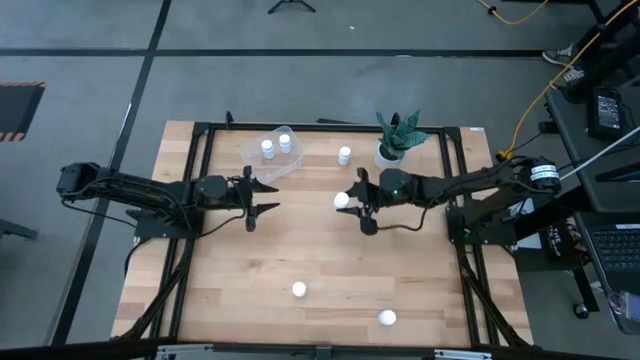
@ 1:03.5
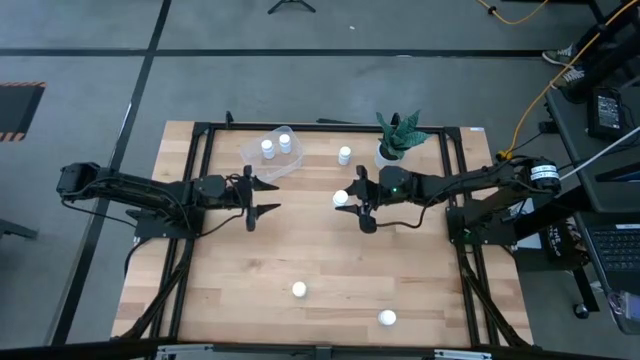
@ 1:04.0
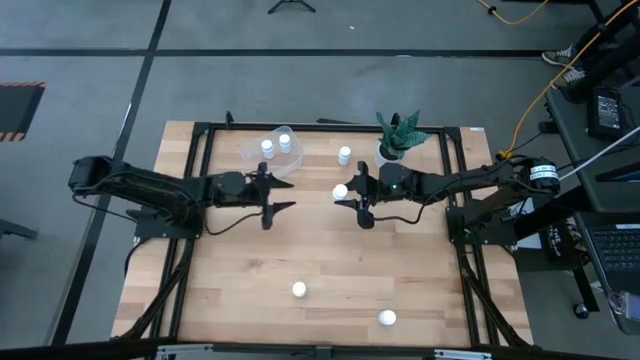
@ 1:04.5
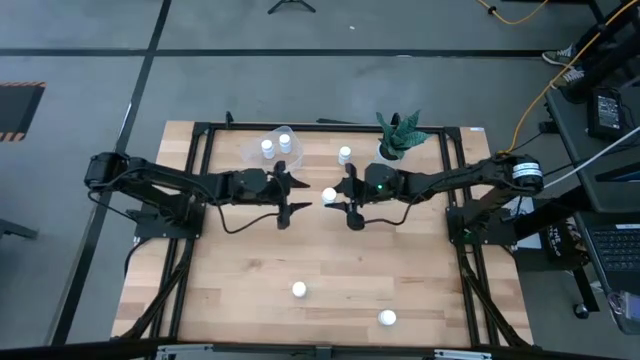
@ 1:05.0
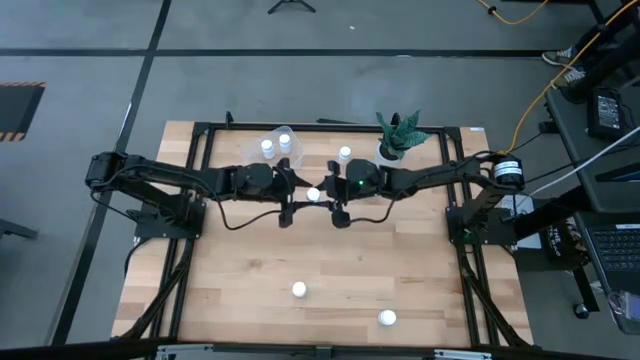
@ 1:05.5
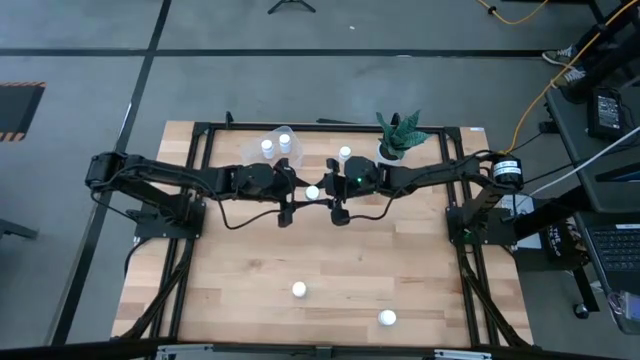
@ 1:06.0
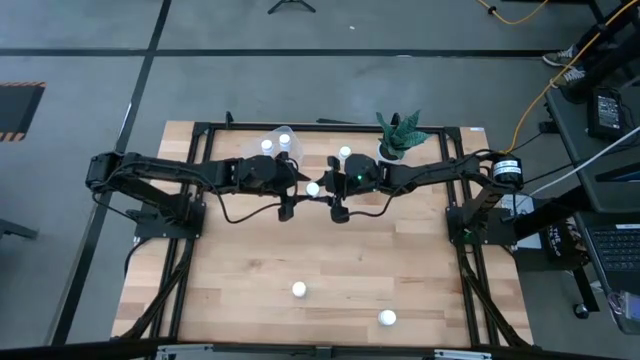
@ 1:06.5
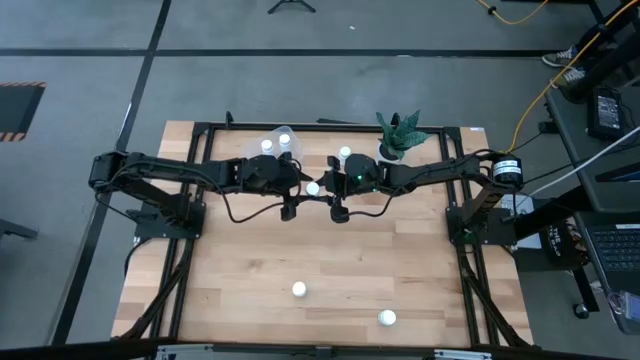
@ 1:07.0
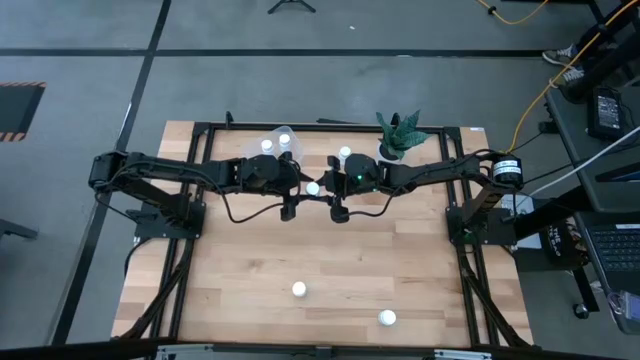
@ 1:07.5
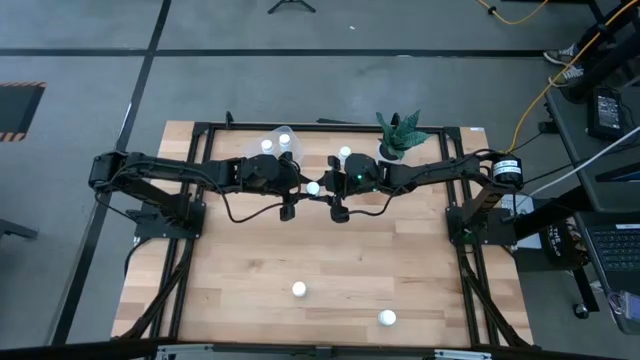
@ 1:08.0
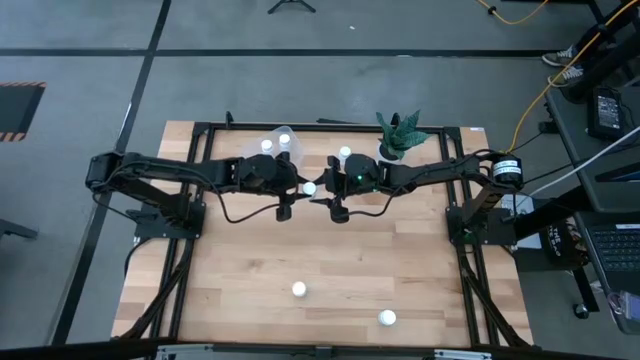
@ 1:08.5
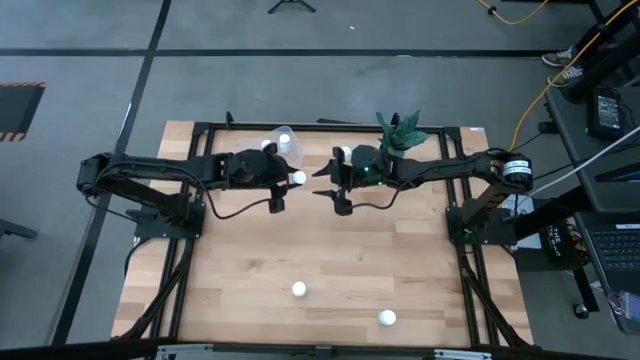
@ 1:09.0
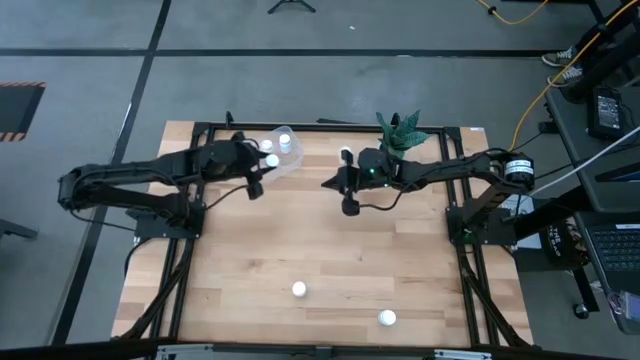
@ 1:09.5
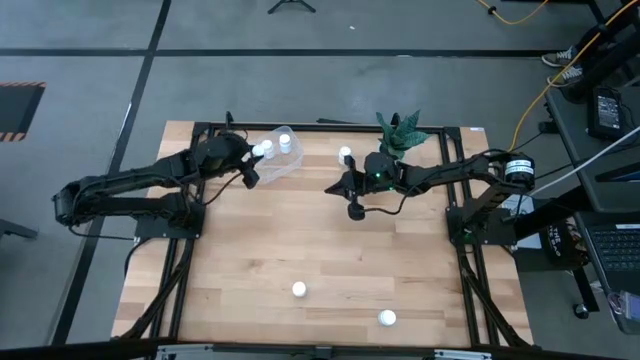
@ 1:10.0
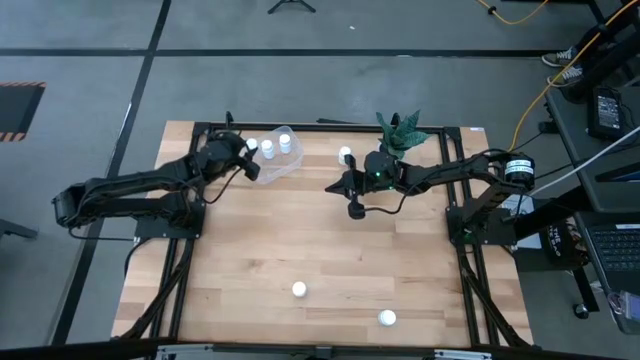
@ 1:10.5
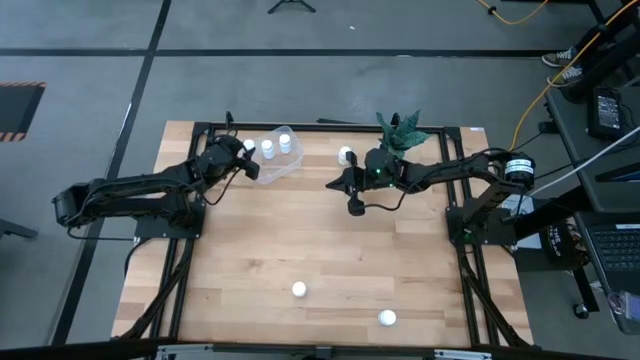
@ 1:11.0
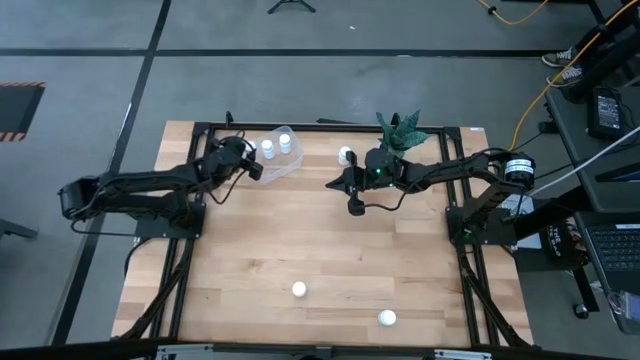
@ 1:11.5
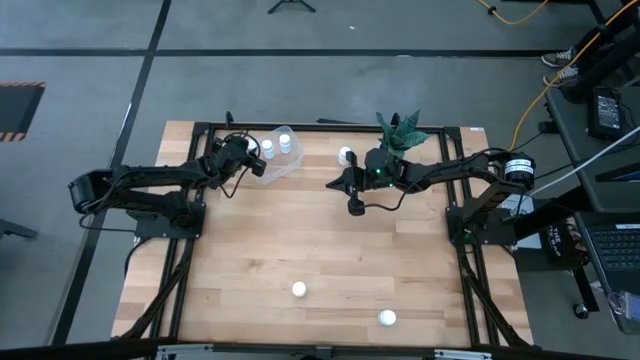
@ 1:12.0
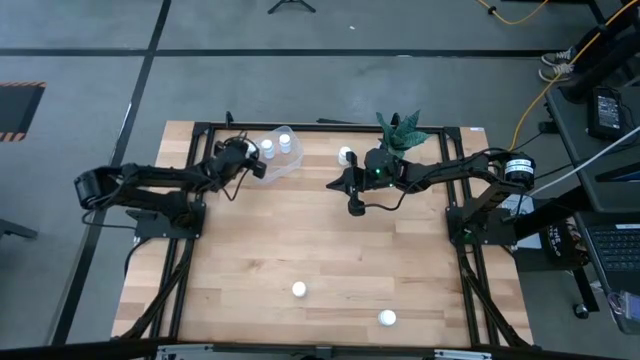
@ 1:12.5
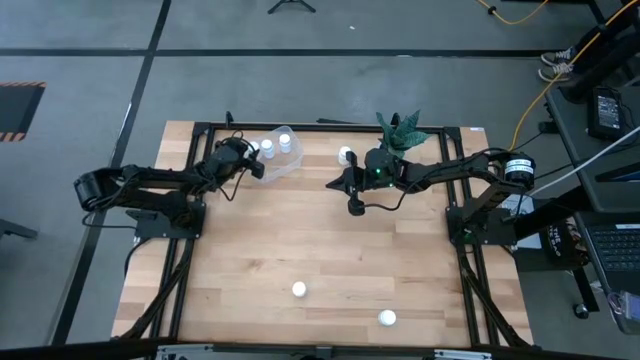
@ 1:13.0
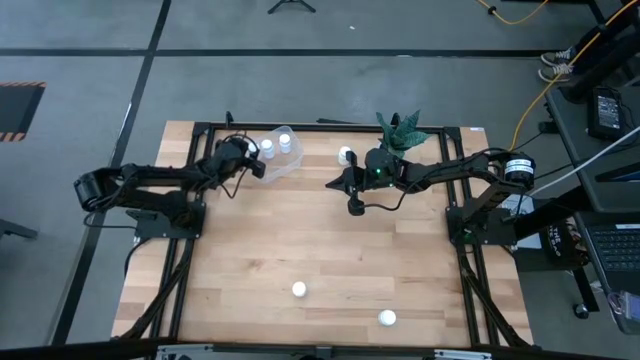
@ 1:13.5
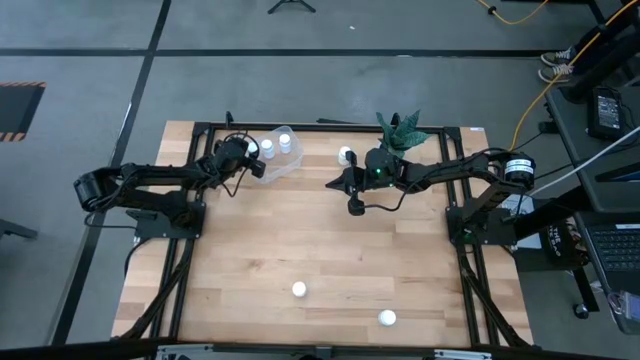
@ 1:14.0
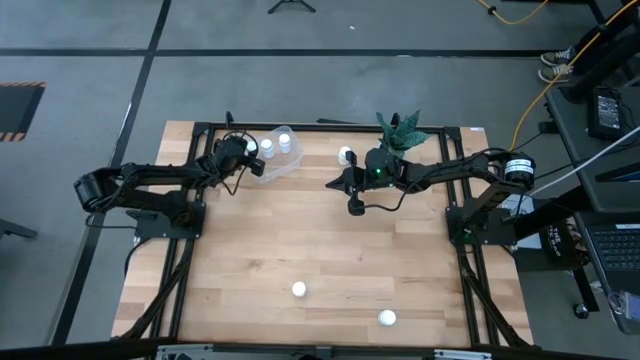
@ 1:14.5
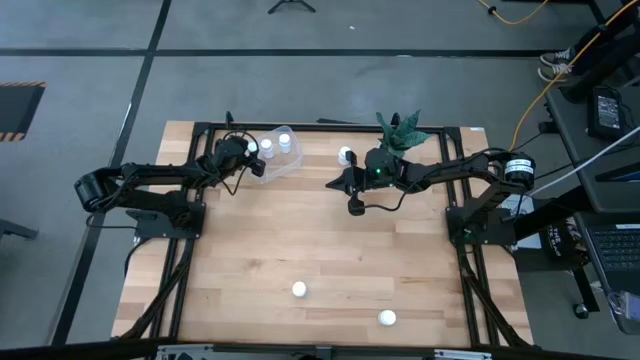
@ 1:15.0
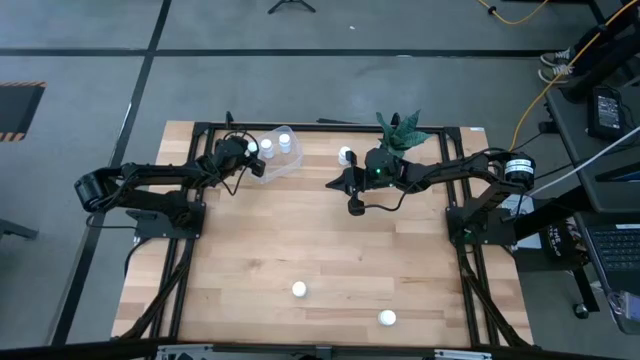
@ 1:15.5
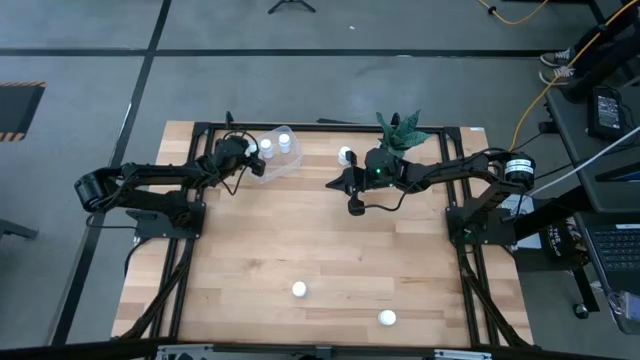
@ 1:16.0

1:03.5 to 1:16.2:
Task: Pick and place pill bottles into a basket
Put the white pill bottle into the transparent container

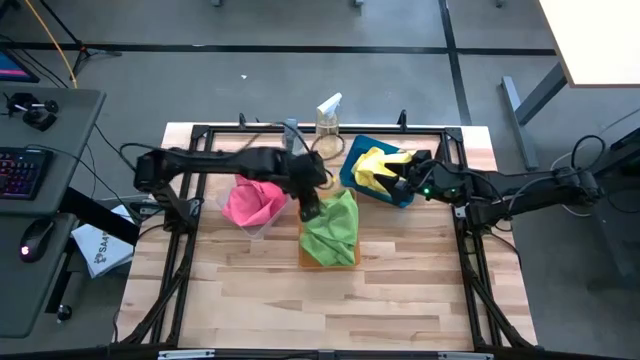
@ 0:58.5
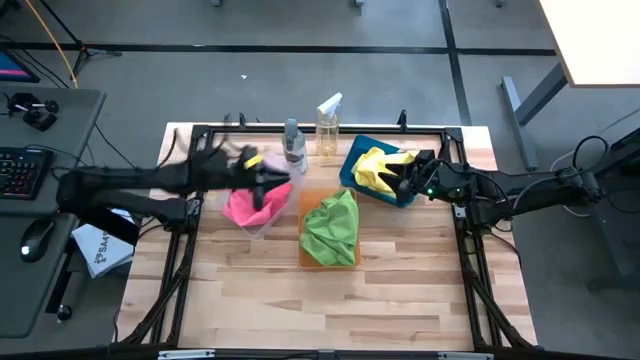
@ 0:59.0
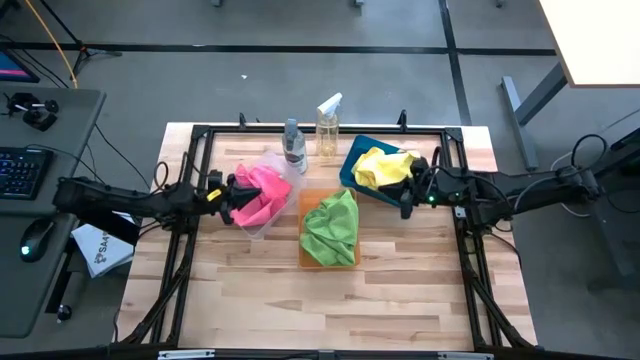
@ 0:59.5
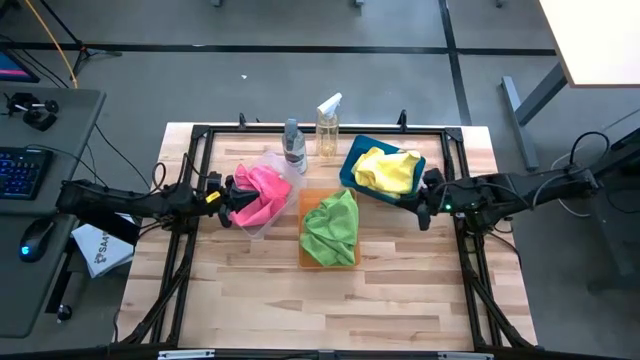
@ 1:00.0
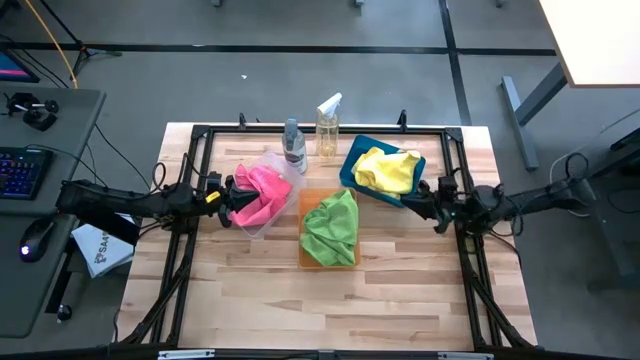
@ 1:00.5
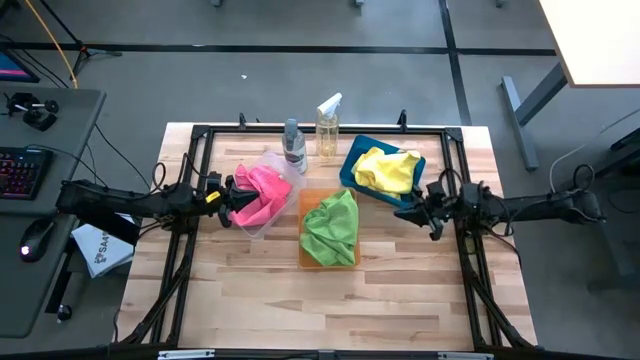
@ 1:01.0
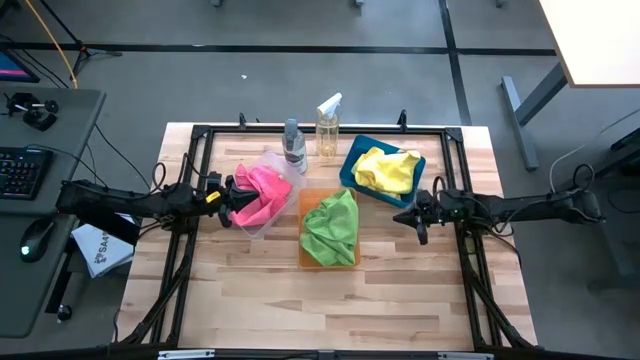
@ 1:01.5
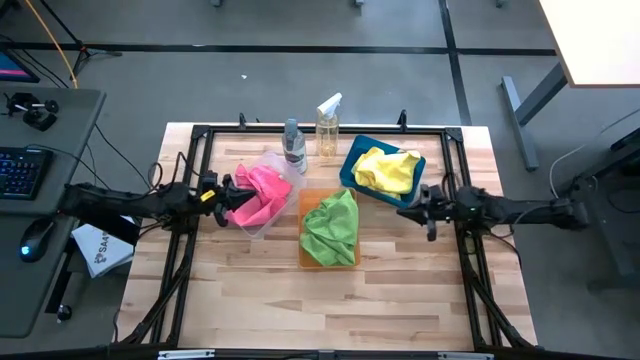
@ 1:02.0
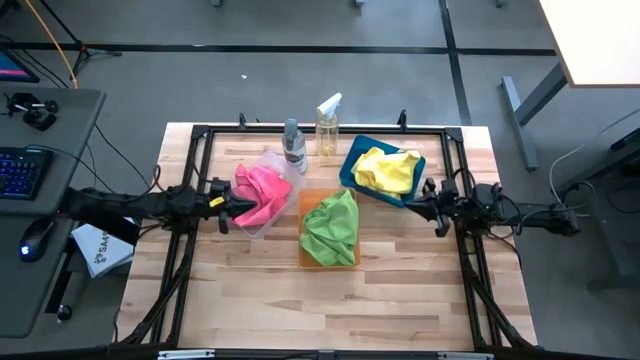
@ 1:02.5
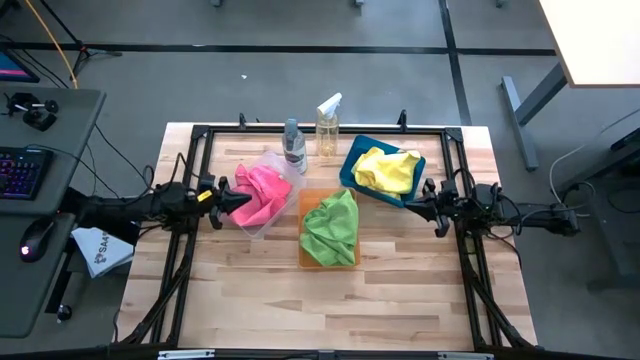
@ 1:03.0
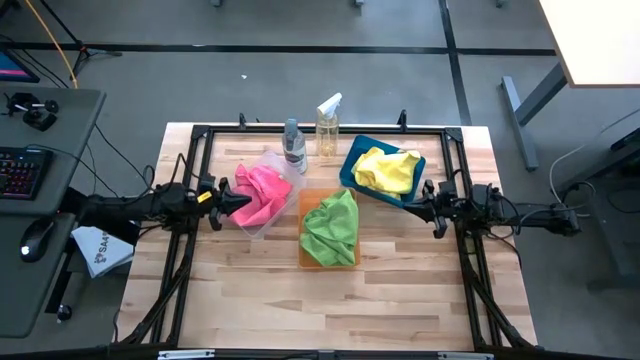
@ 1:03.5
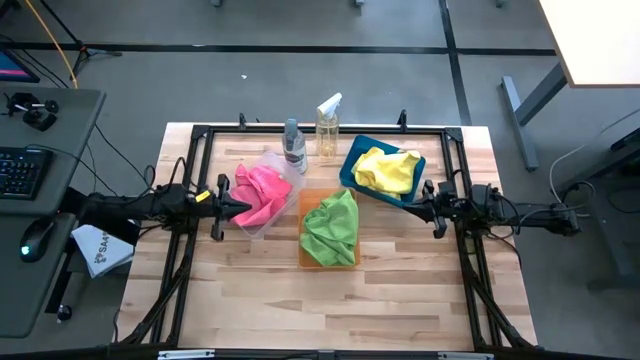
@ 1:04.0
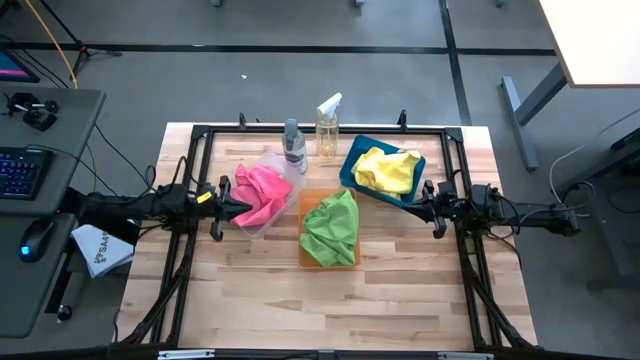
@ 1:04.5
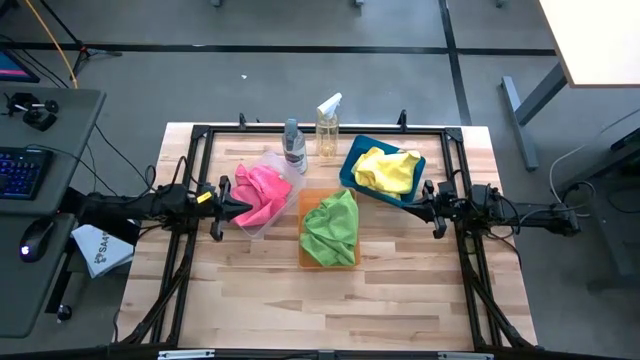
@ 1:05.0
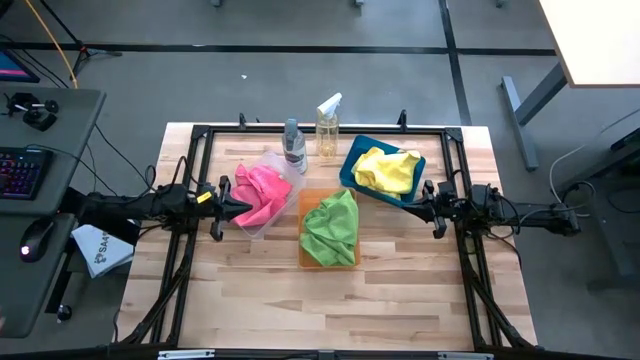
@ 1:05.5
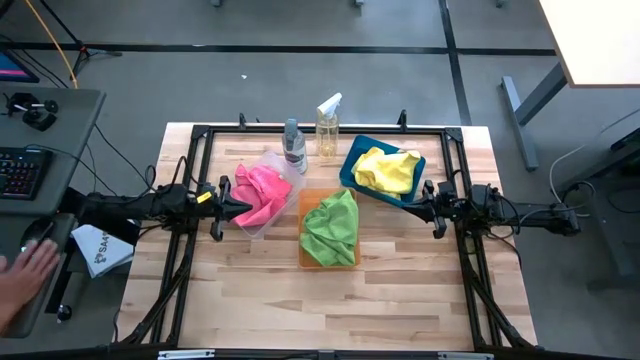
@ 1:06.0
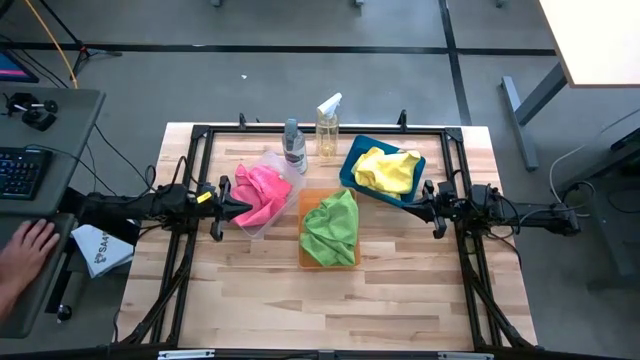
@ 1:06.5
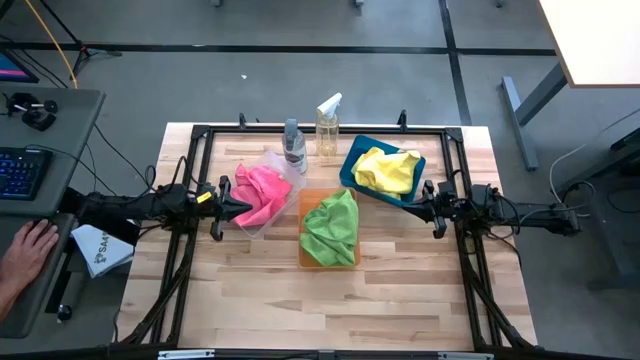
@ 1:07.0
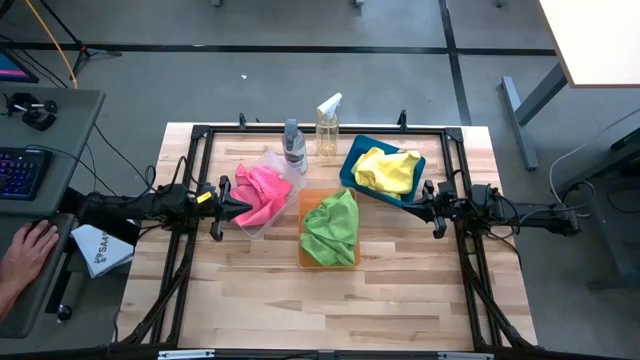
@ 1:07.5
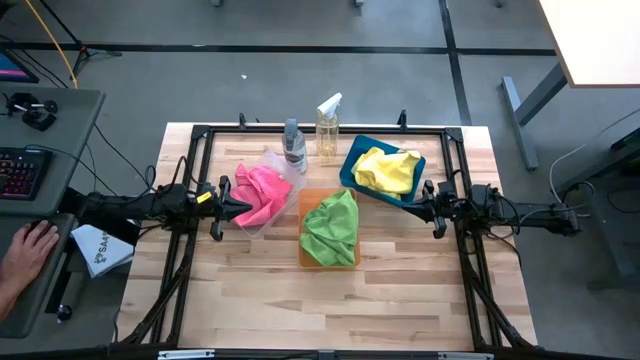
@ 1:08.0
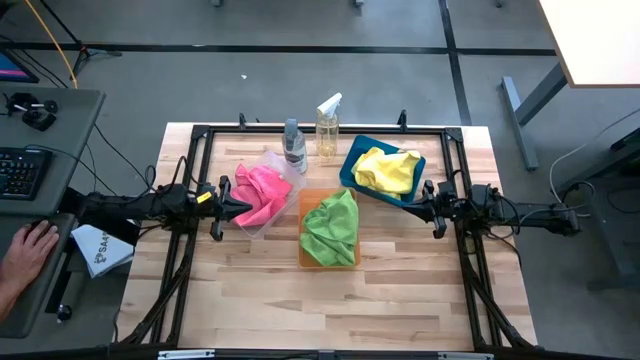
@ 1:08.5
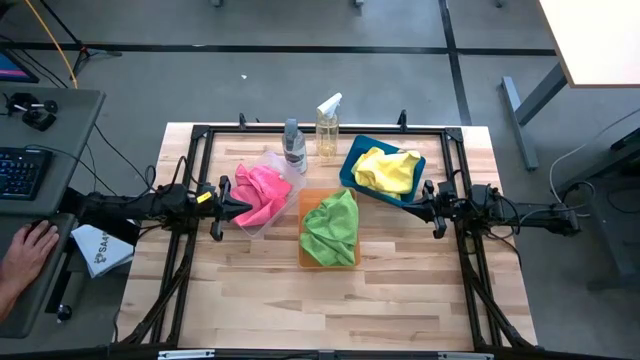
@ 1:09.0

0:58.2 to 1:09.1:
Task: Sort microfiber towel by color & place in baskets
Return to Home Position
